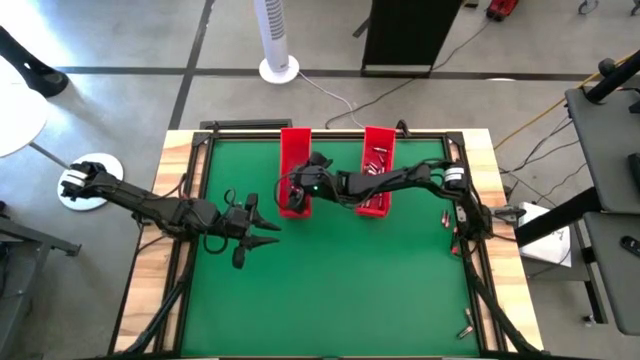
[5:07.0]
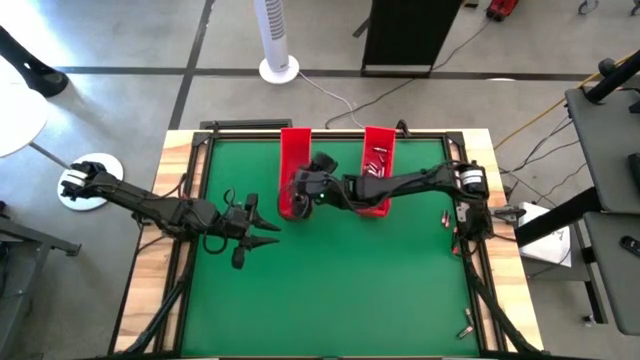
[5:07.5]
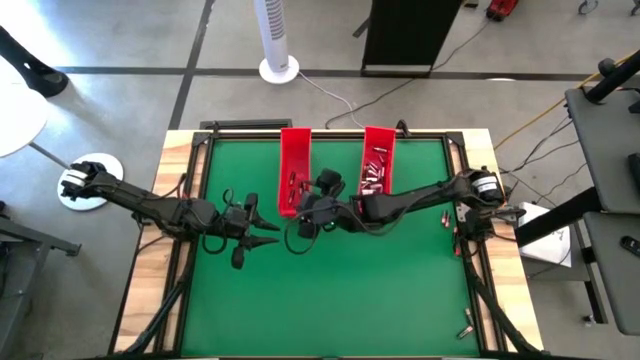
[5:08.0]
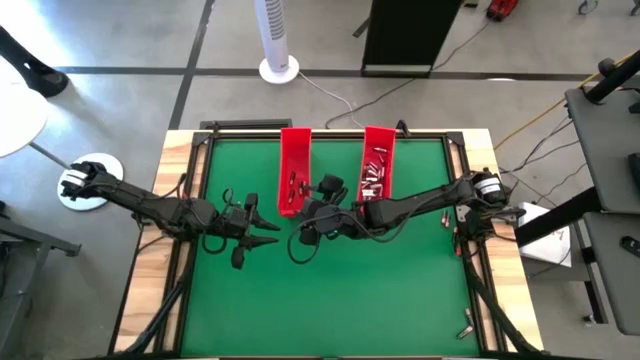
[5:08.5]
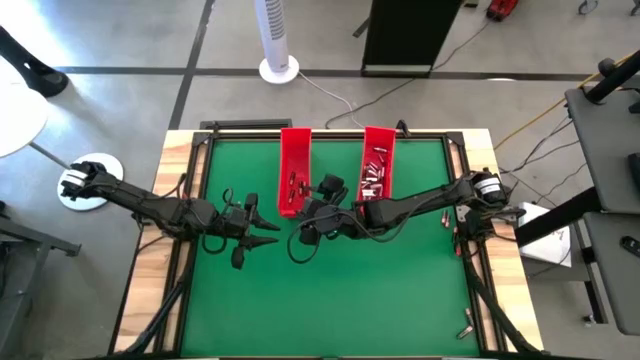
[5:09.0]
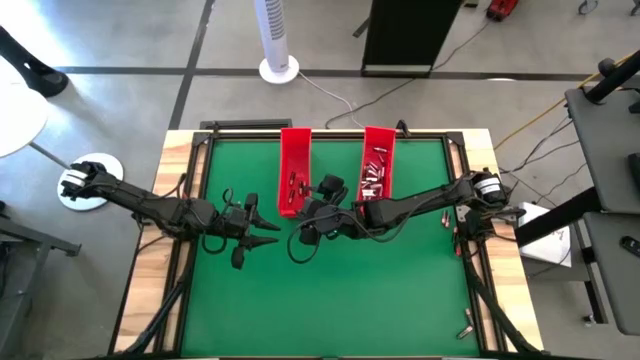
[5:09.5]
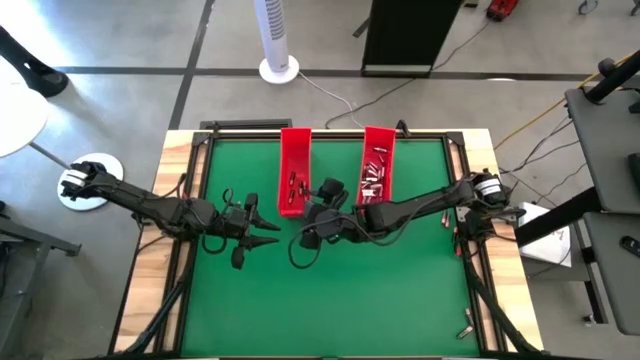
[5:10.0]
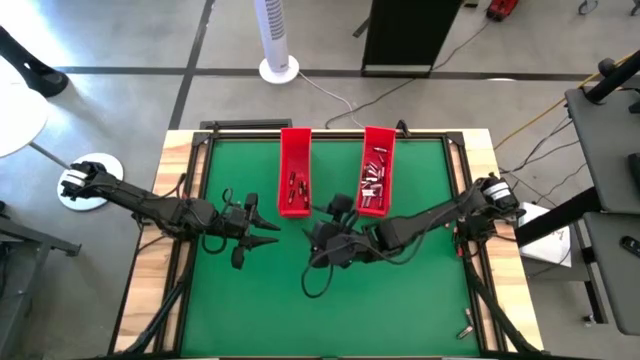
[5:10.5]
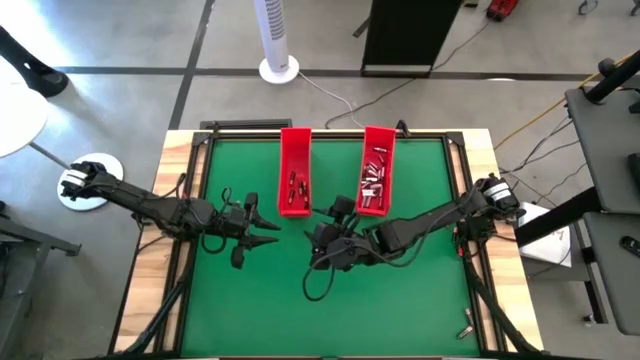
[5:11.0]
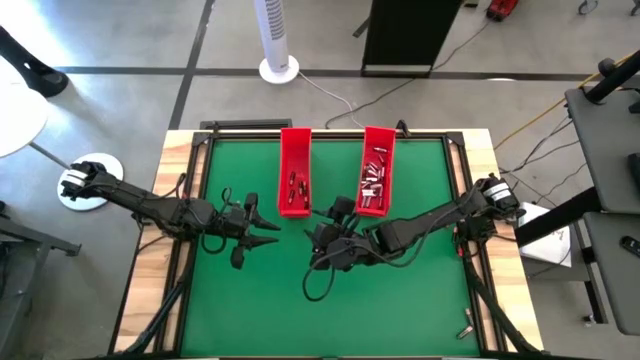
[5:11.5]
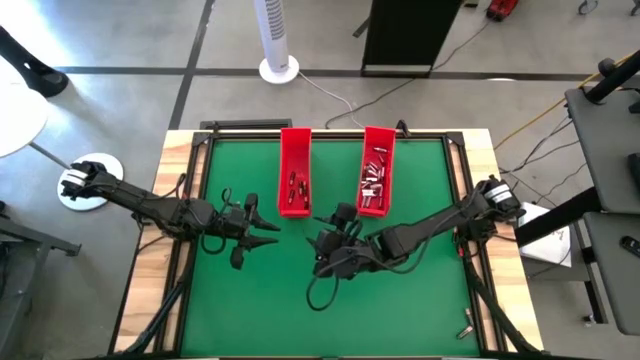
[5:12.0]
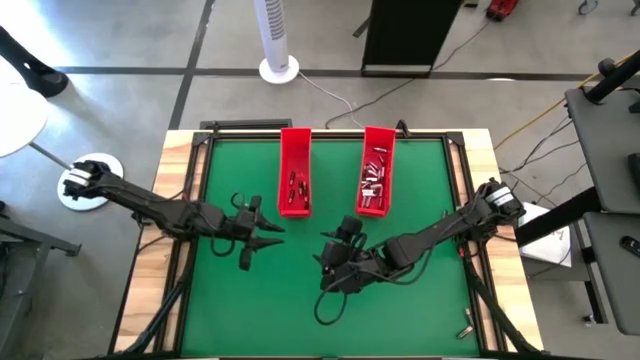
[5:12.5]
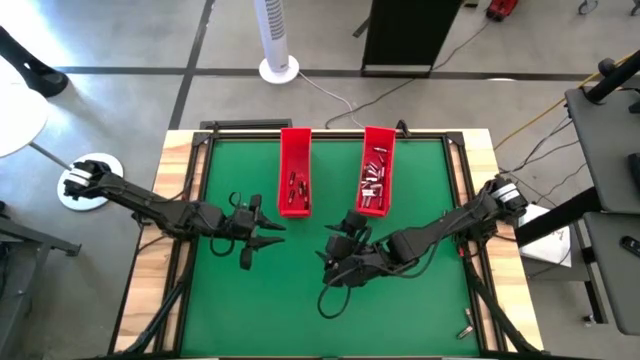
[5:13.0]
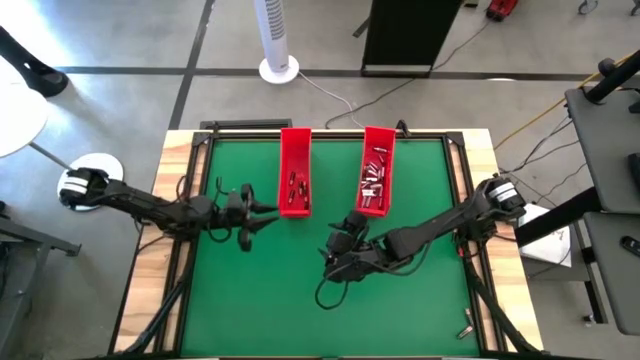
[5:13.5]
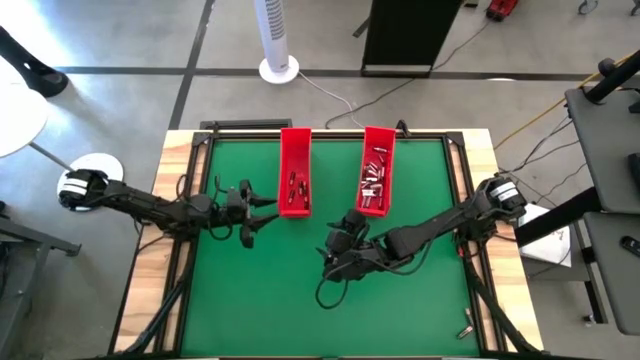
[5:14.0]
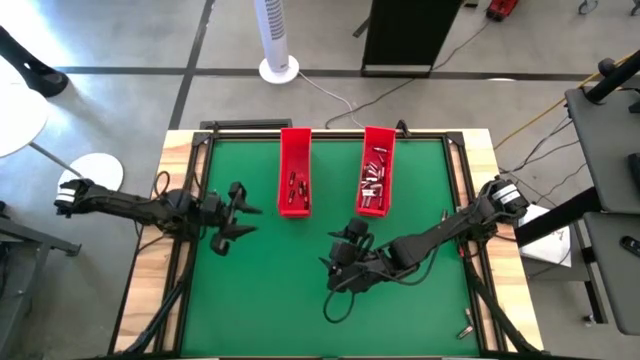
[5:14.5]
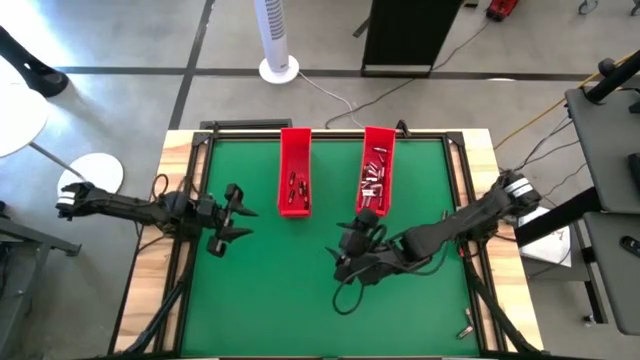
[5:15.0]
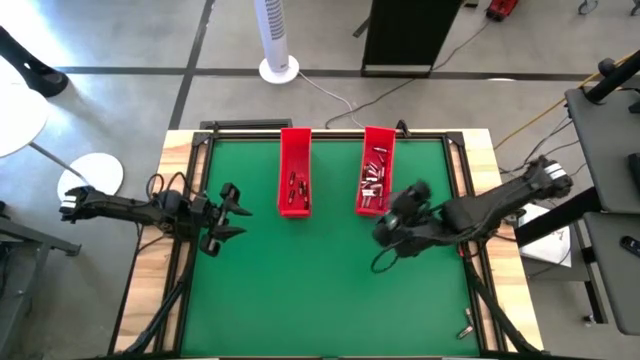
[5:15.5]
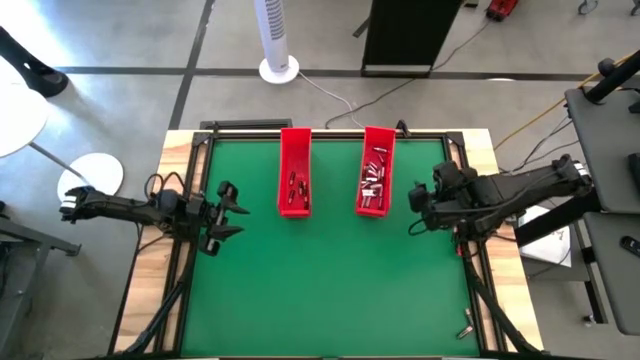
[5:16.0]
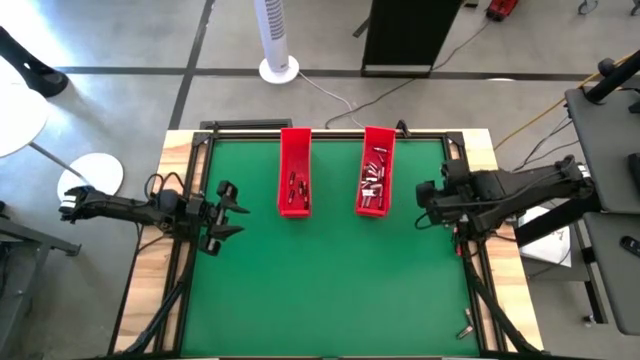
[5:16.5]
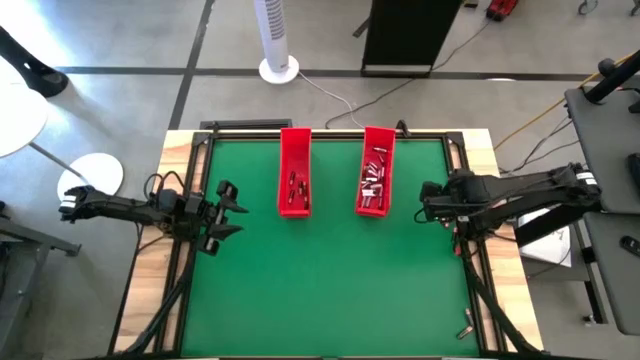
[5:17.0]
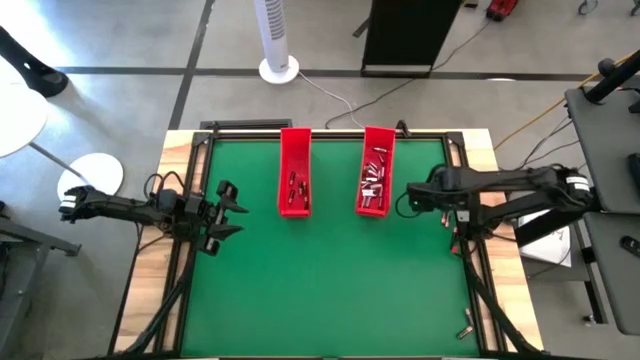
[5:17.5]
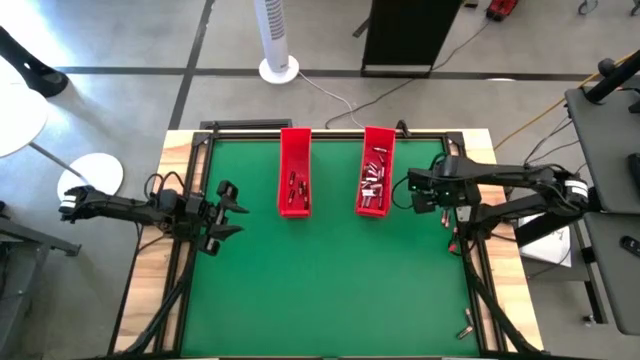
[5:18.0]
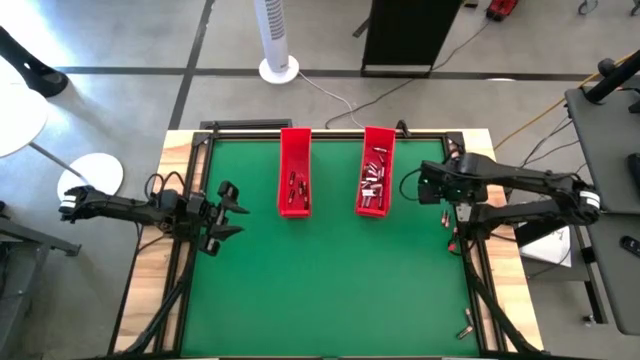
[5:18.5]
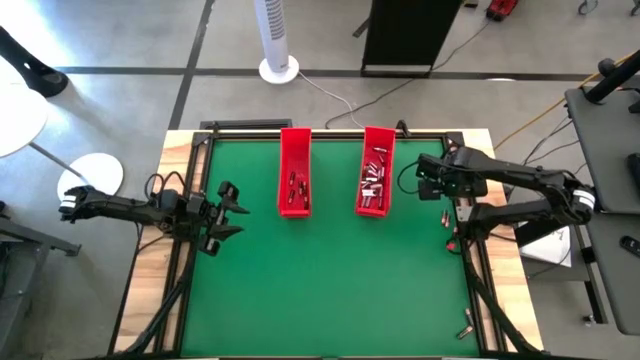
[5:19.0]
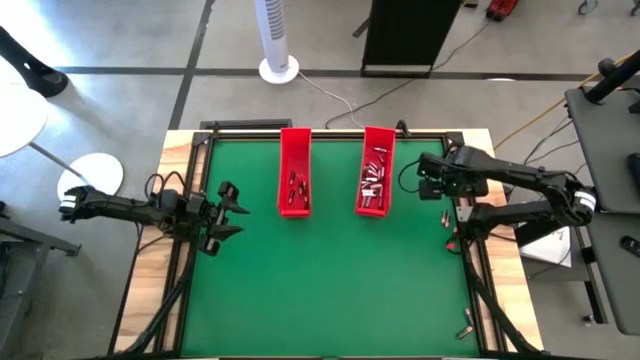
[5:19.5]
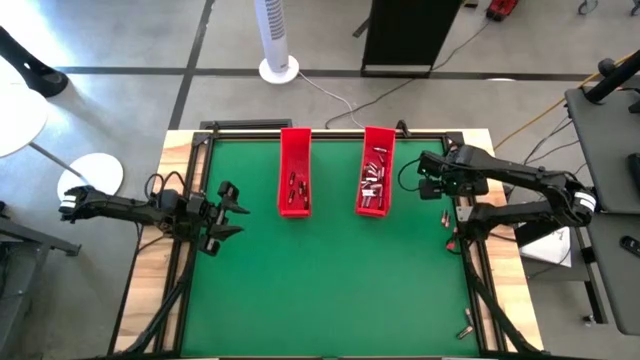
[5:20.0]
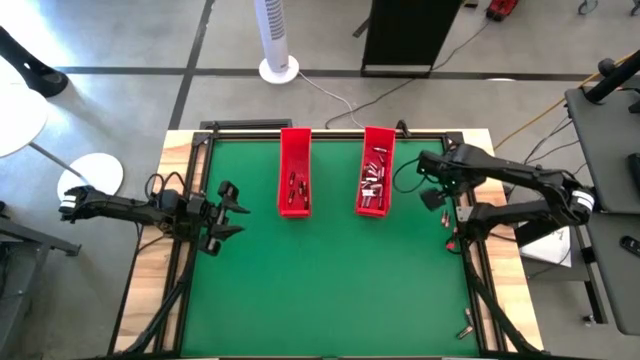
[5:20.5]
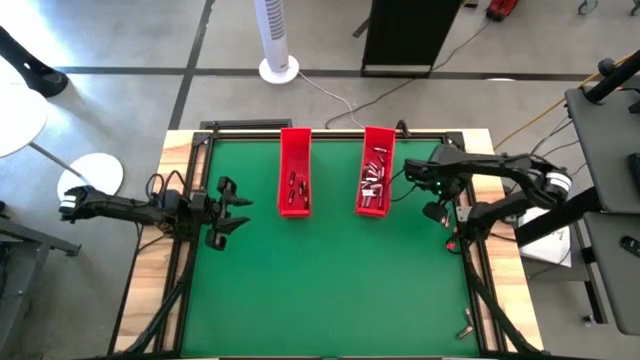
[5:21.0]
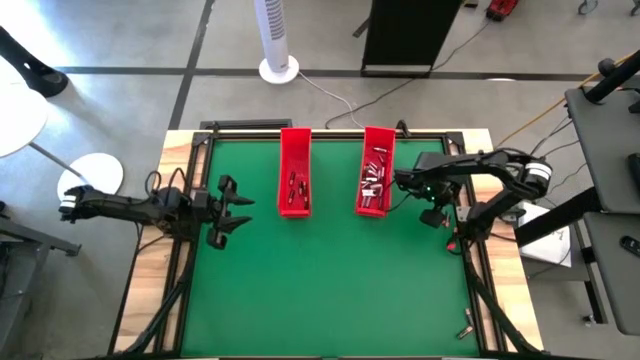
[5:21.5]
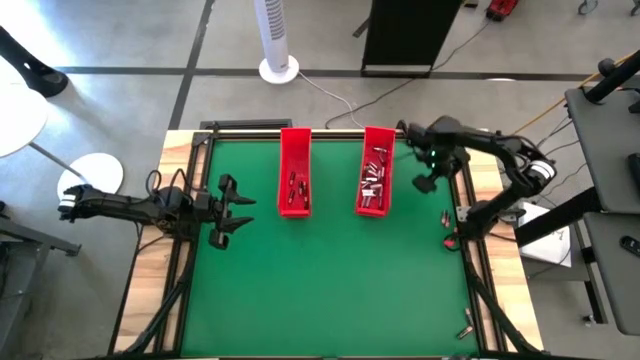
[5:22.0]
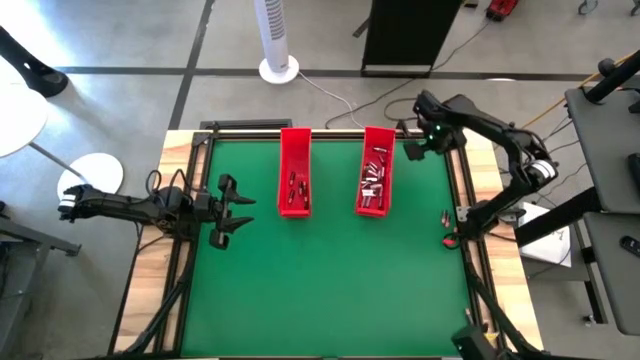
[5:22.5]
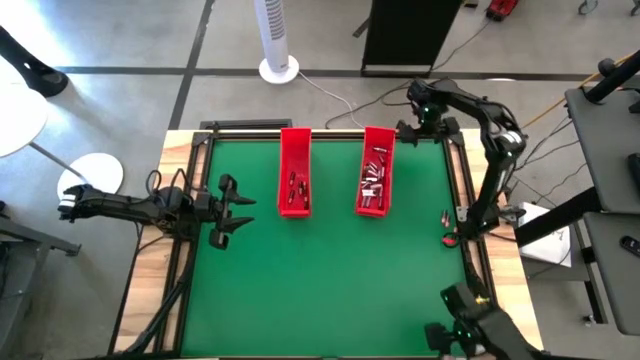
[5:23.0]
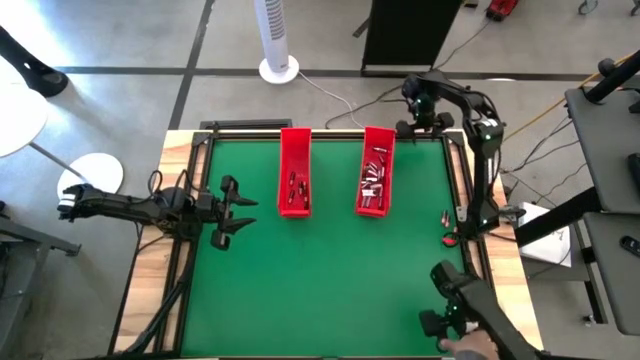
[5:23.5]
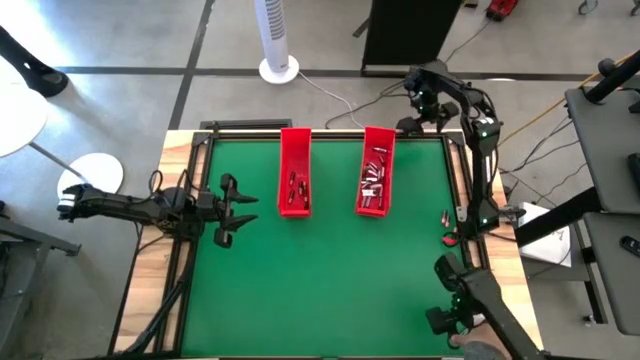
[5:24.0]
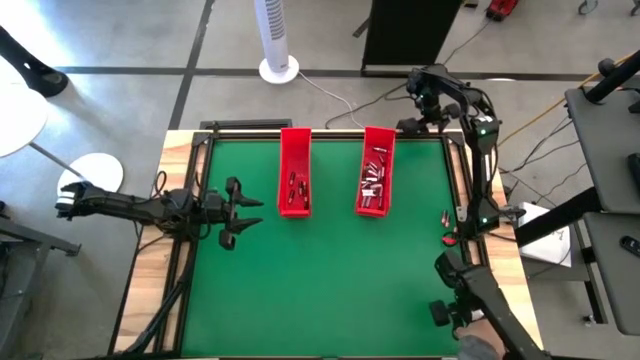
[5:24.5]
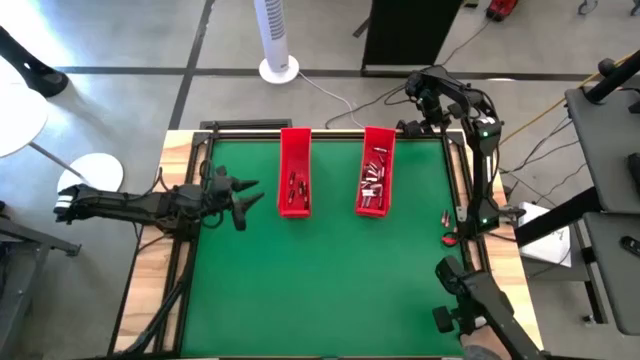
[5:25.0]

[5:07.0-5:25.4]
Task: Sort batteries
Put the black battery into the left red bin

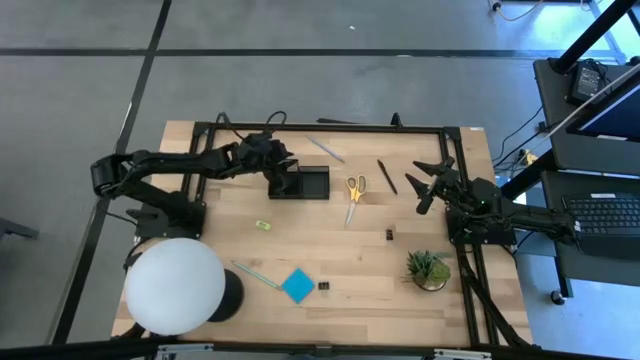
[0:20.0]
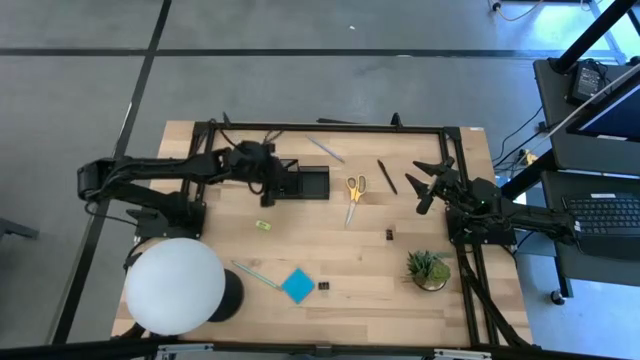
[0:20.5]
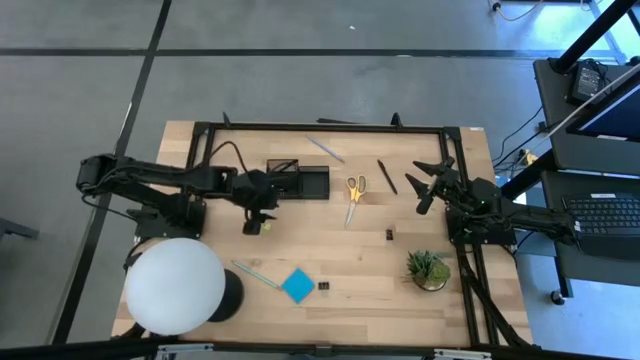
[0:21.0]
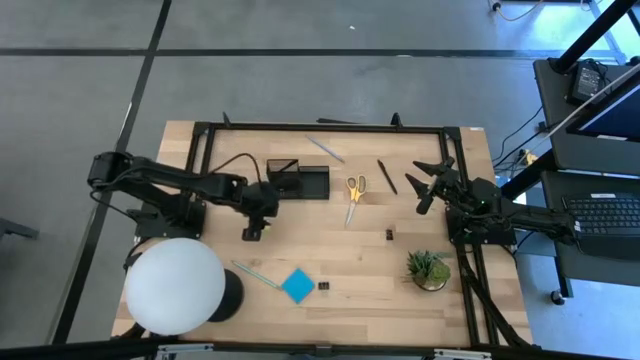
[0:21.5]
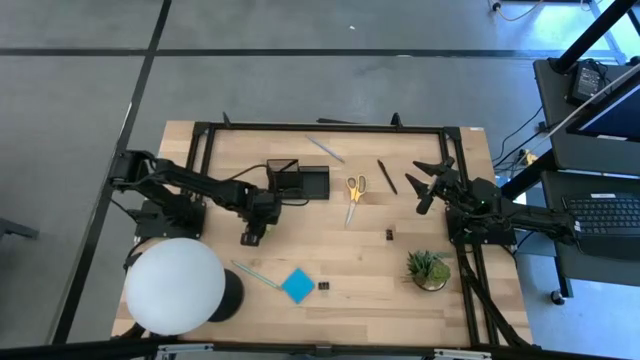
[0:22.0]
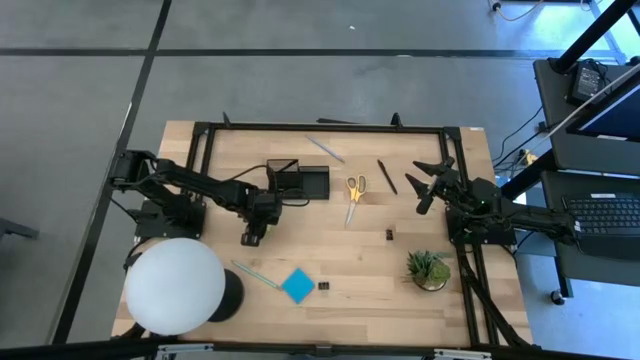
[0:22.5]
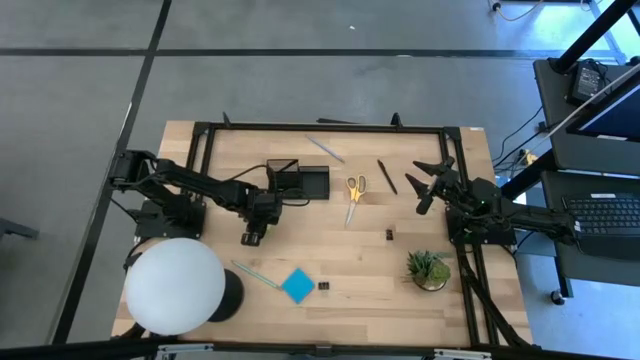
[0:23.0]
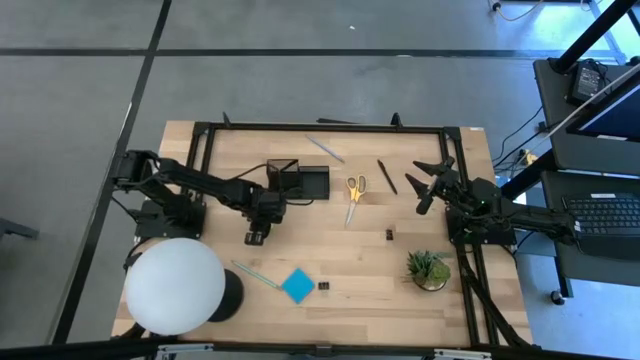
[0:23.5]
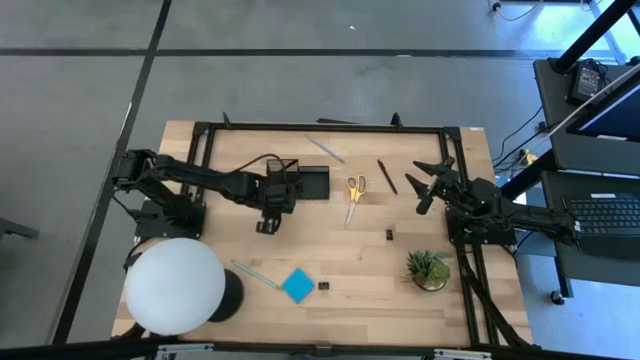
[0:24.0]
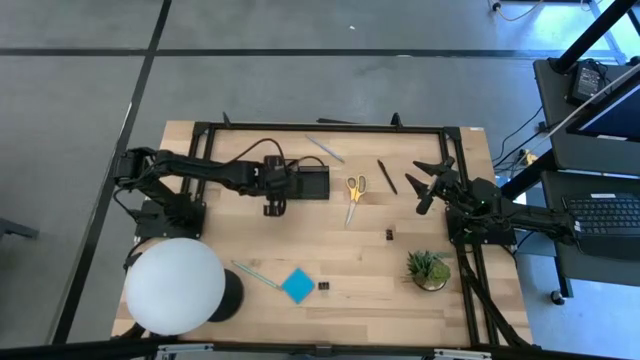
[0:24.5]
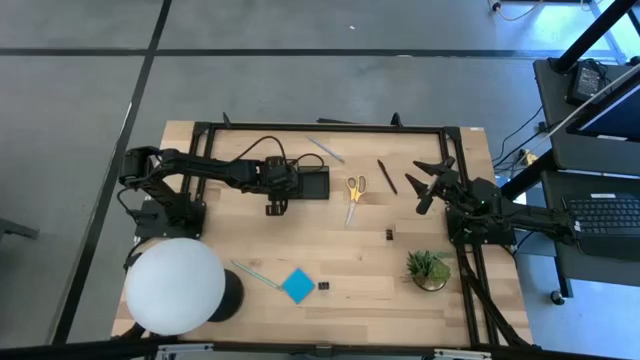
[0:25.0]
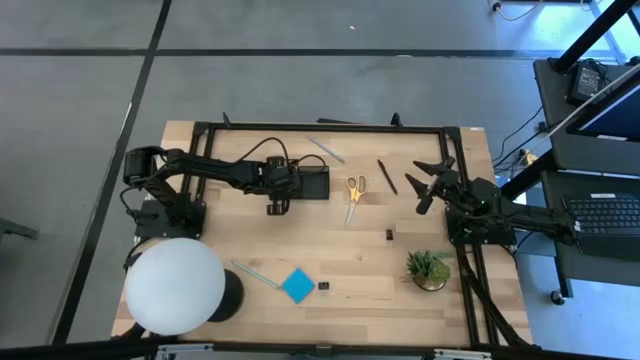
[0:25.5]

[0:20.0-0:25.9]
Task: Pick and place office supplies into organizer
Put the green eraser into the black desk organizer
